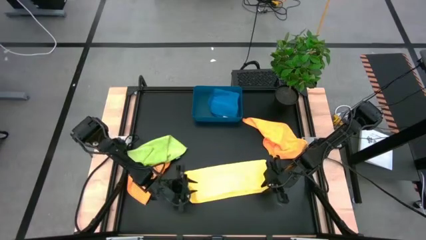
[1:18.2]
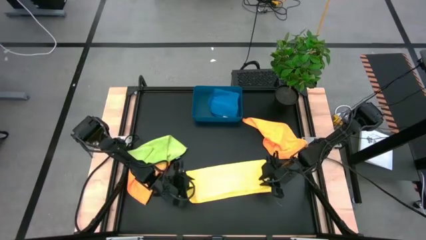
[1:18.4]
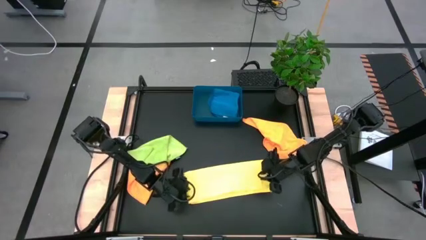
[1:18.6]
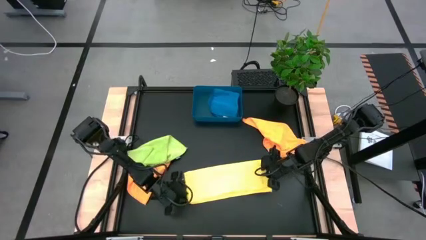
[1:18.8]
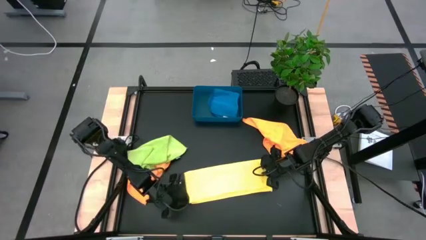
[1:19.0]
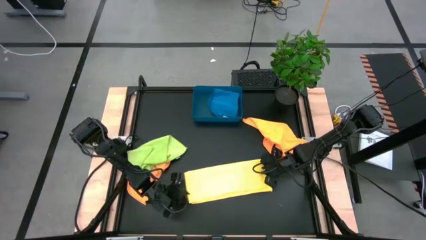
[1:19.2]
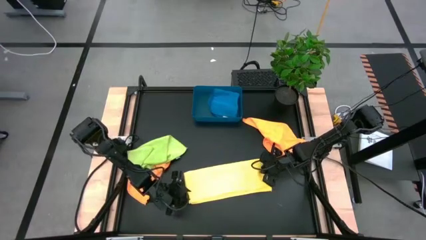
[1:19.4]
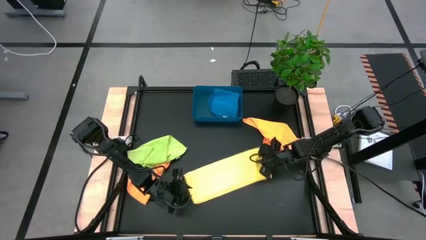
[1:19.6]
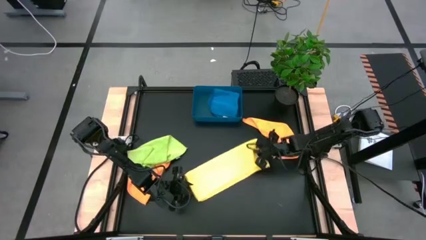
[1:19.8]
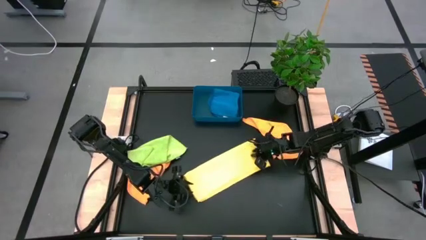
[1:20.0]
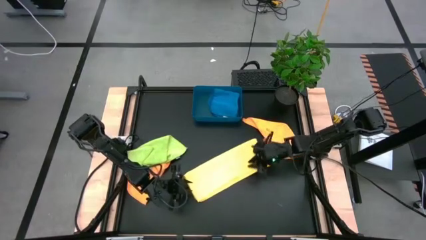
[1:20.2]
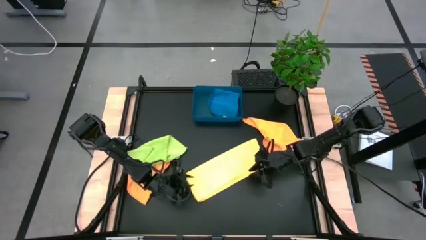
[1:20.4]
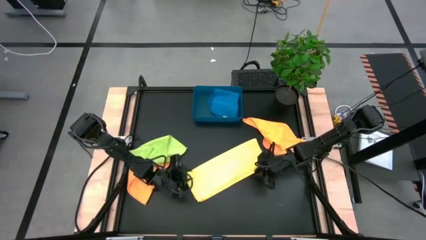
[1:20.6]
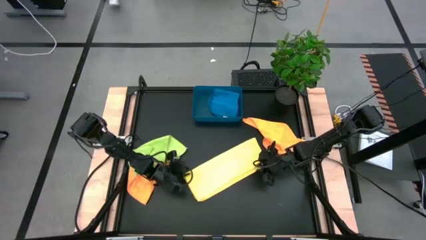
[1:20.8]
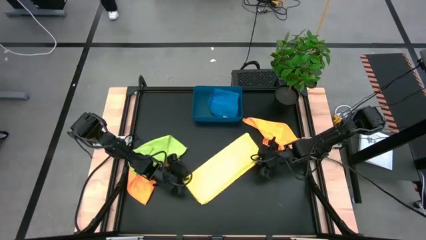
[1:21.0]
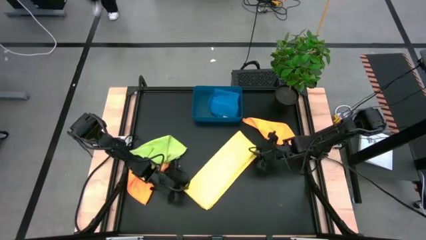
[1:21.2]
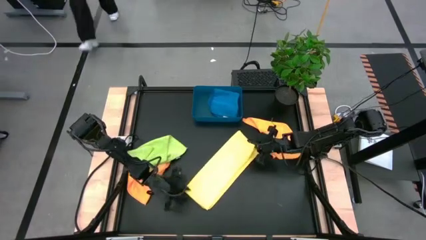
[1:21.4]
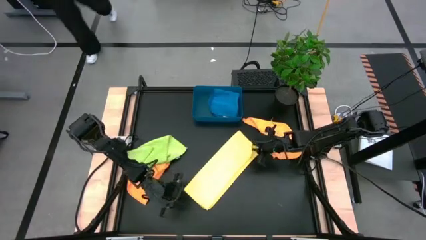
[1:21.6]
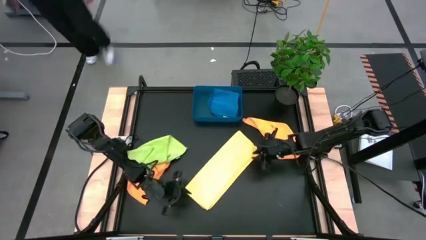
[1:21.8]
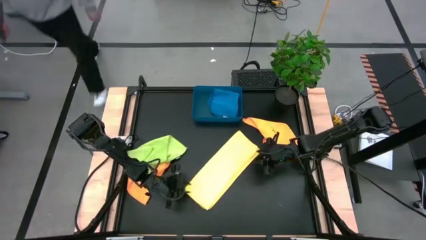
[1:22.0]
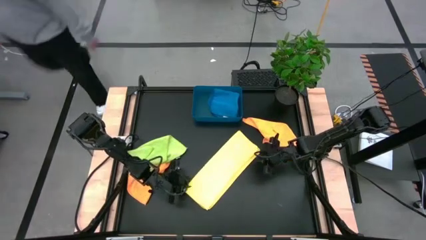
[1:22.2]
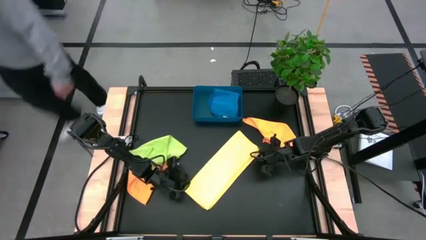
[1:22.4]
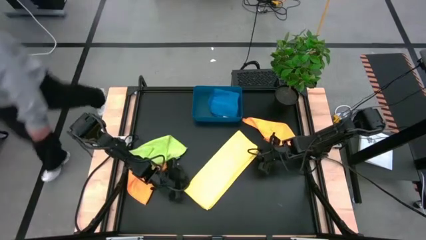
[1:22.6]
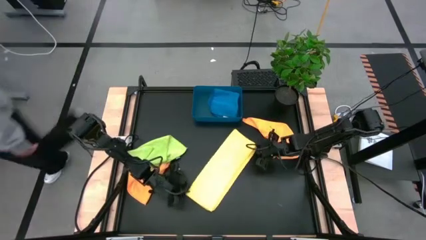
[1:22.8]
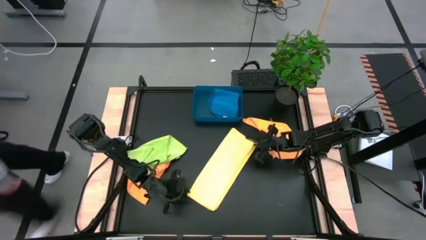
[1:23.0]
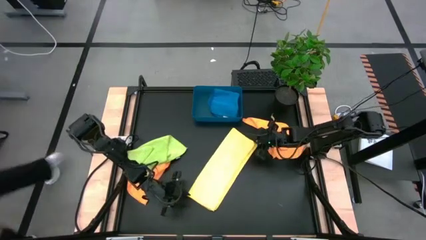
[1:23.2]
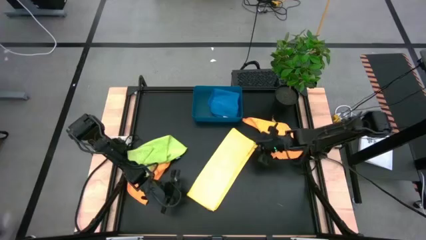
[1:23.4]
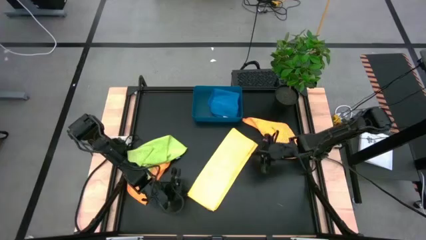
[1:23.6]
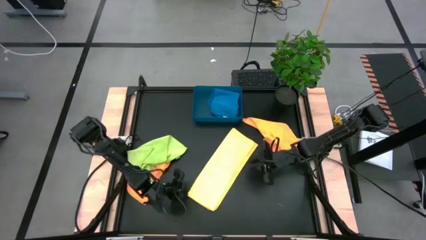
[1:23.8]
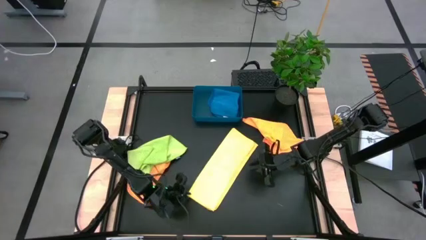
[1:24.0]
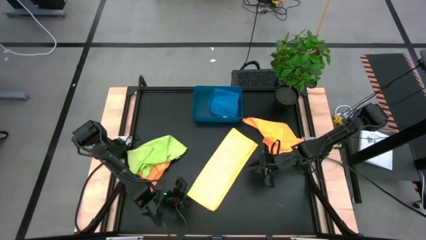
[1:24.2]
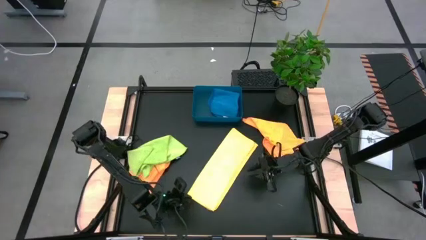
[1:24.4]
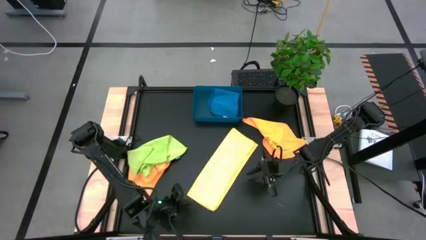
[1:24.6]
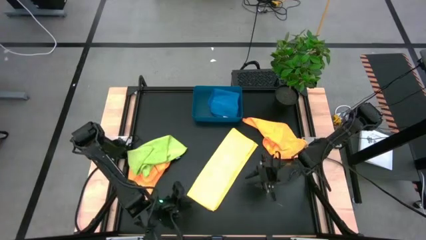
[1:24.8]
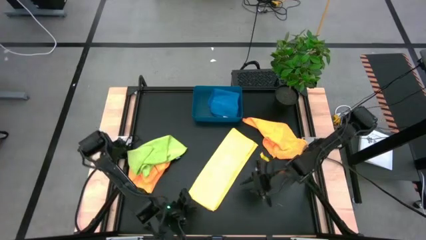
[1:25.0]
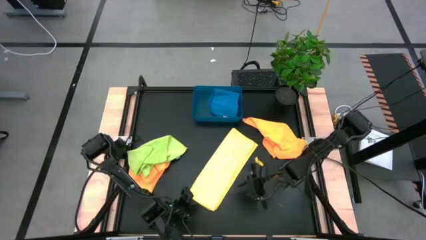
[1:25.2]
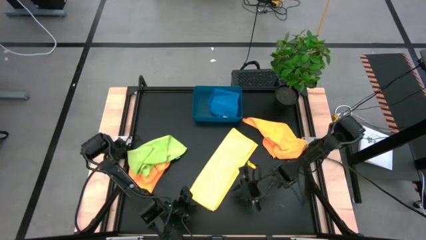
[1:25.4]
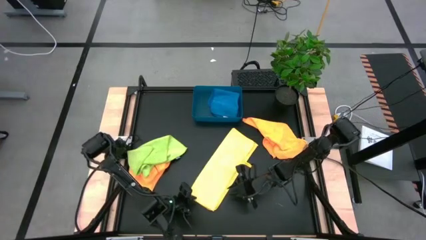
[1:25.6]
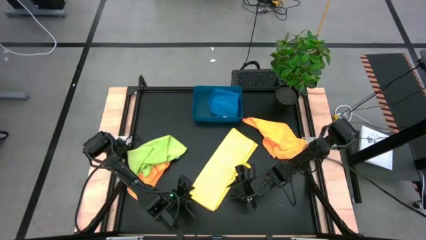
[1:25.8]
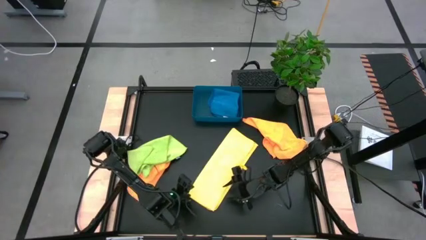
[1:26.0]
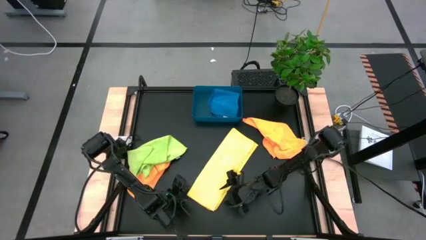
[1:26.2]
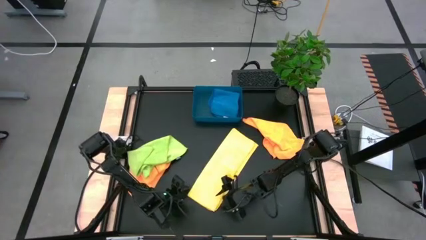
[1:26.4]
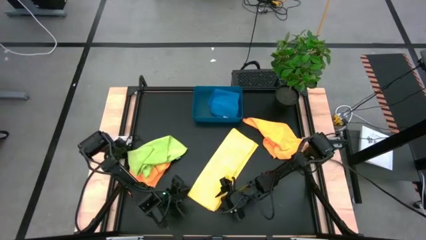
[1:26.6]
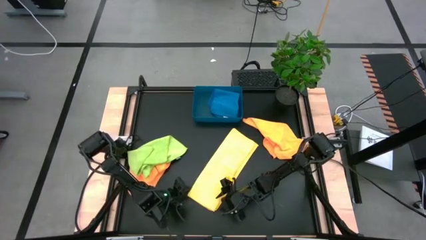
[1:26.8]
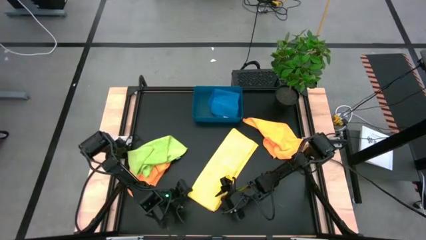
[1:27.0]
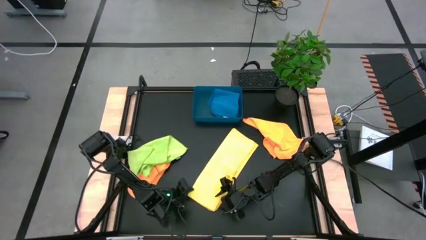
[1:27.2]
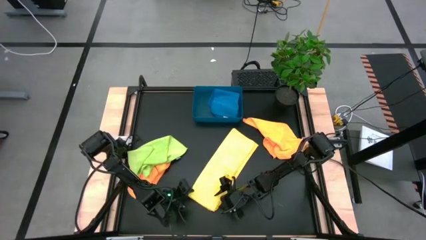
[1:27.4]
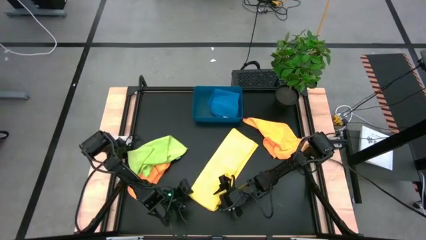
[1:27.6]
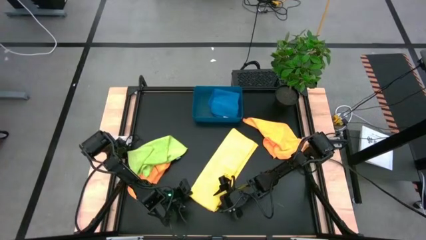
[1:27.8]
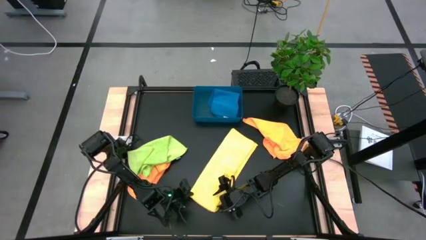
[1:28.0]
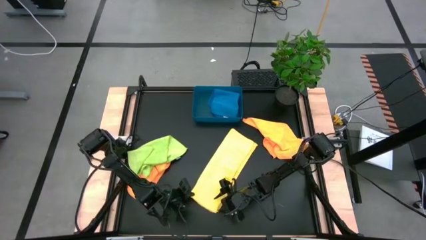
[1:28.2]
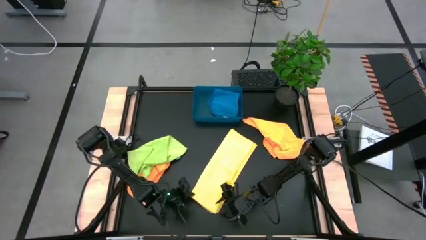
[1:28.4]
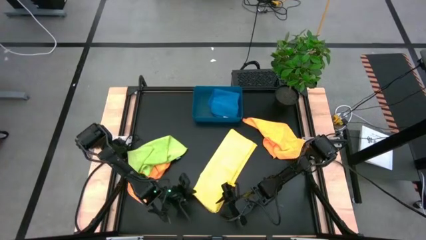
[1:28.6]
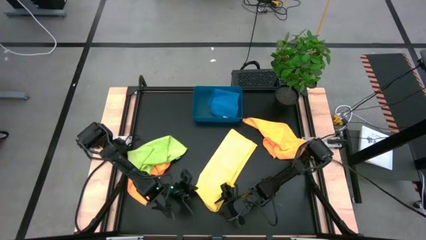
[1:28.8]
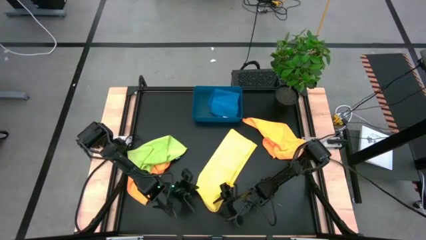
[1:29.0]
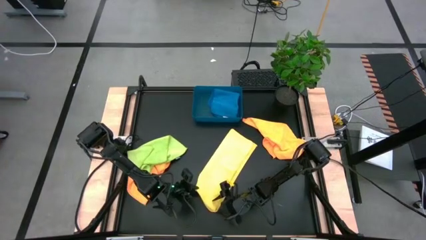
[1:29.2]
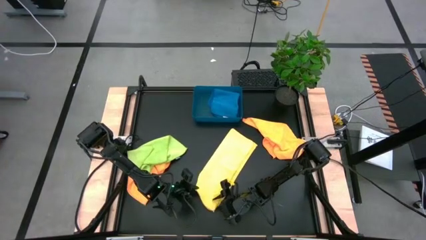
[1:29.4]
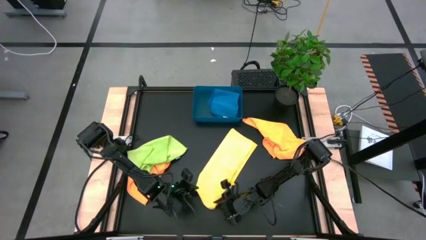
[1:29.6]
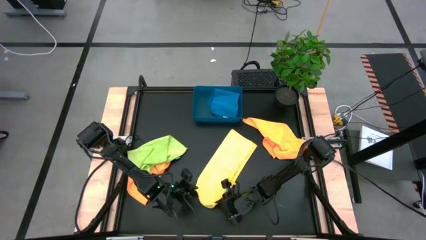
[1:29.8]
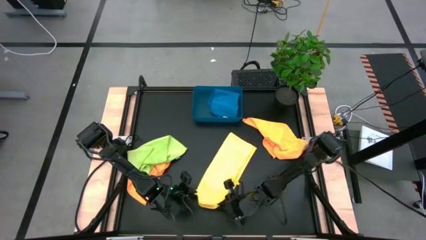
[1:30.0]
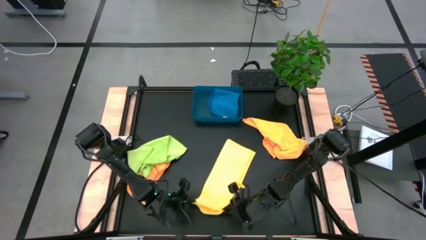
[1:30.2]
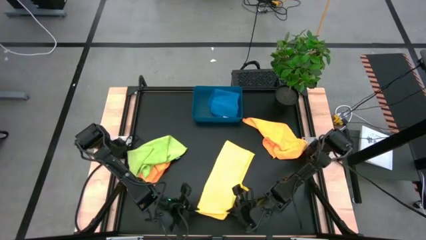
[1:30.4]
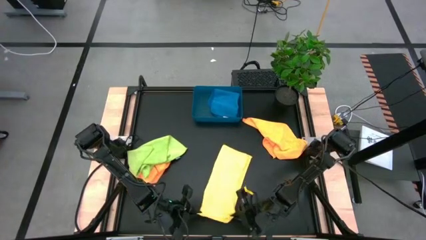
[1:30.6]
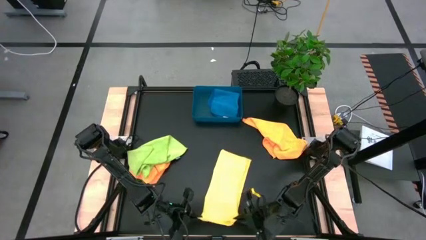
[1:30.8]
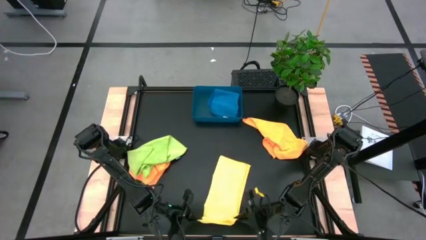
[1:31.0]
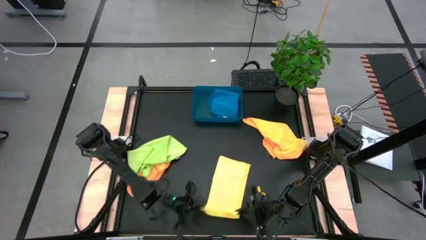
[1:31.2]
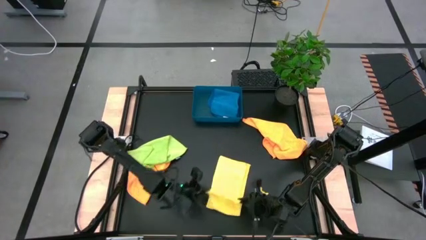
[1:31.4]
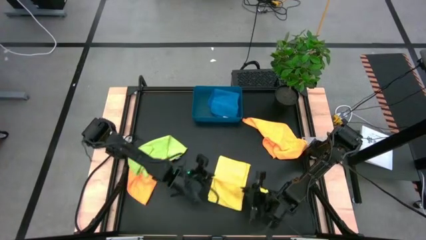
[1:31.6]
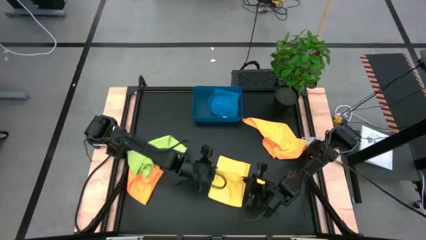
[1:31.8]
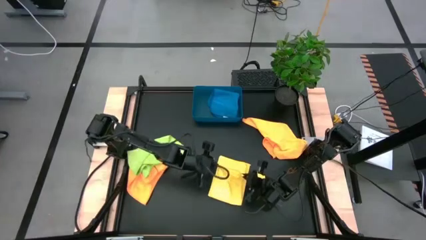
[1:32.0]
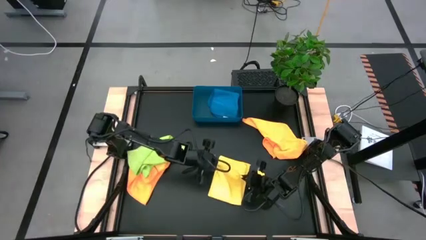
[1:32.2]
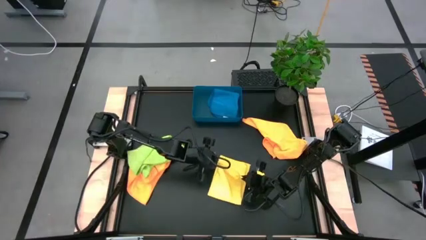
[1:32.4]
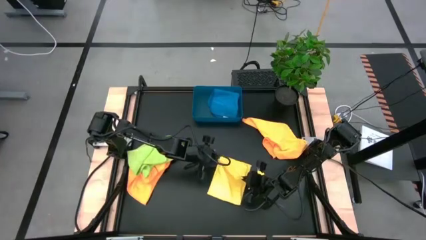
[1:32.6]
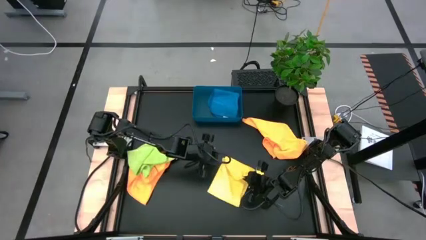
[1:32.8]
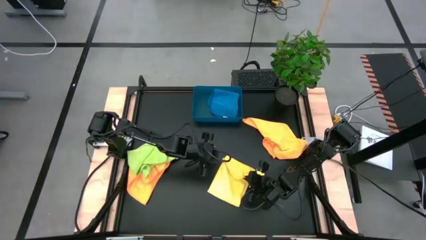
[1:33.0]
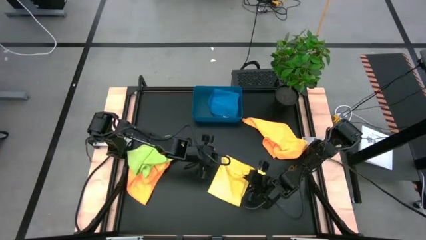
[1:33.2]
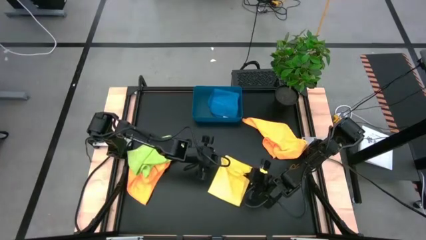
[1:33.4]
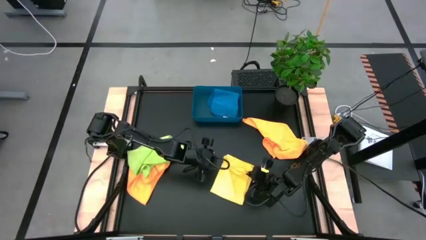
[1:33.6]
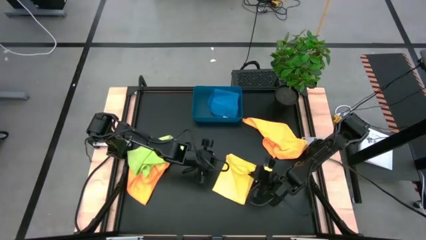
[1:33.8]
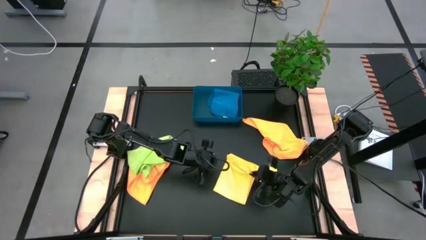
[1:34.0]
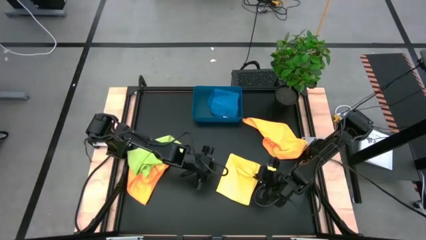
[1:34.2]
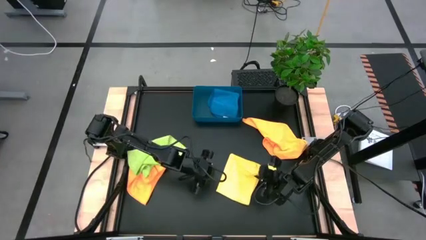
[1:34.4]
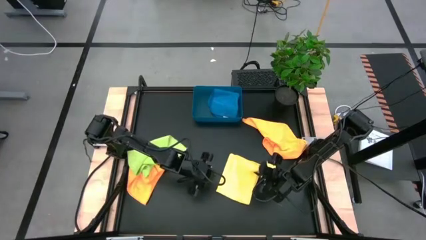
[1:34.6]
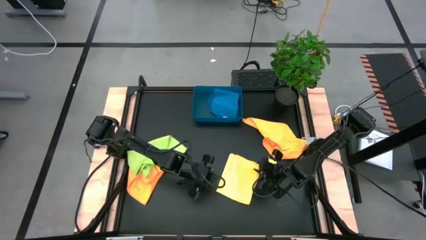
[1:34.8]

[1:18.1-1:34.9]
Task: Fold microfiber towels
Fold the yellow microfiber cloth
